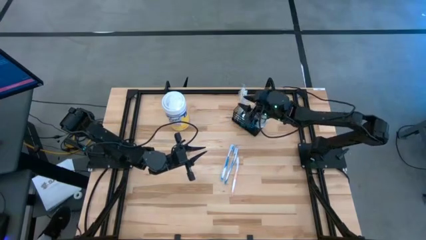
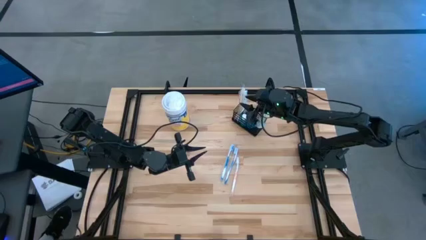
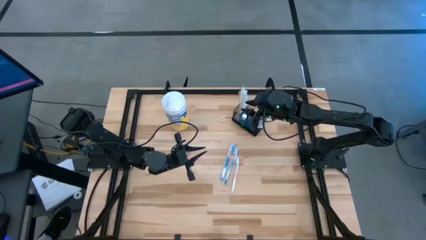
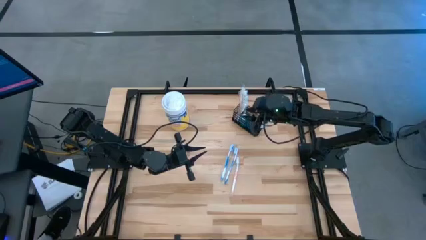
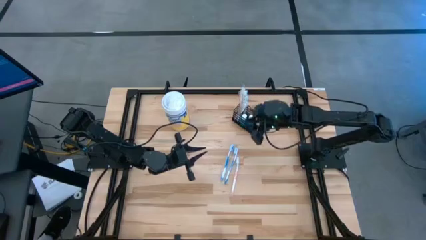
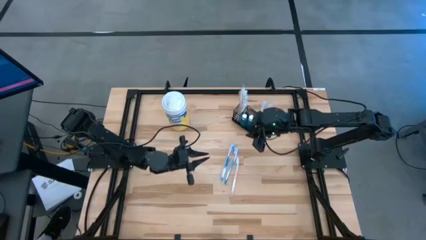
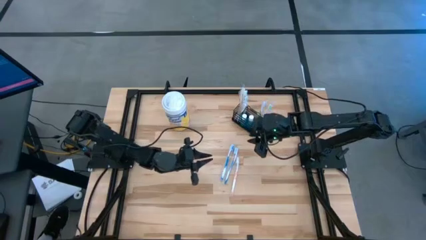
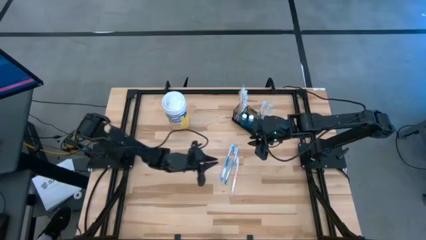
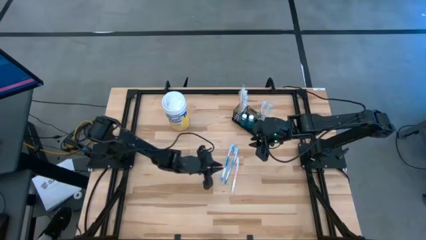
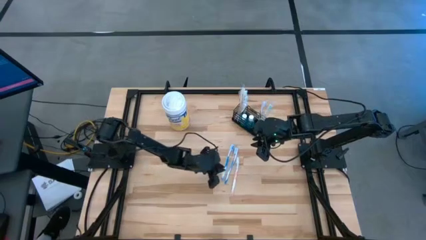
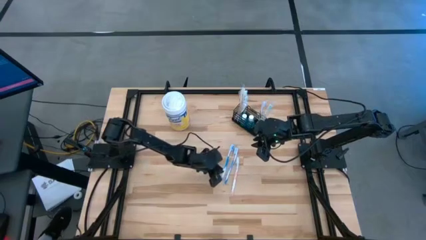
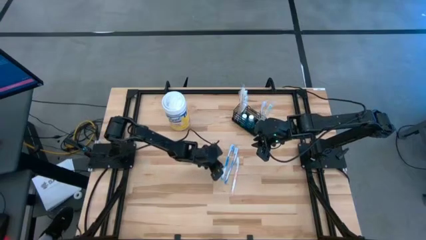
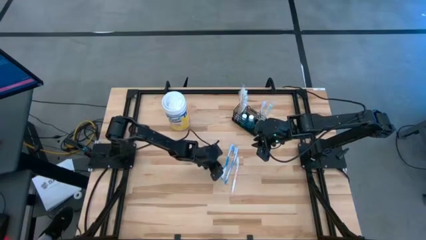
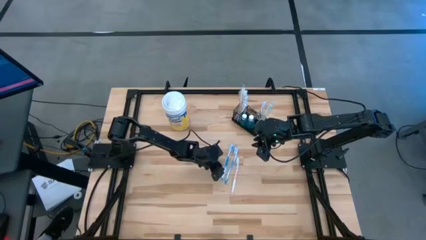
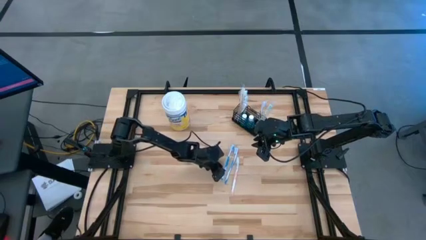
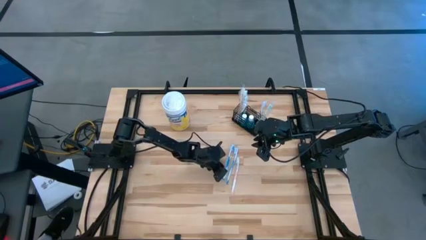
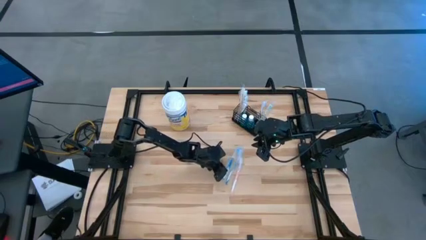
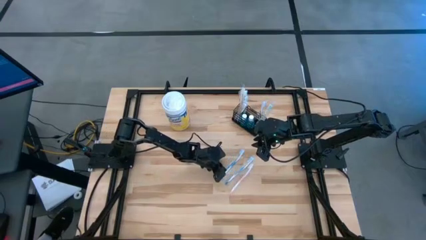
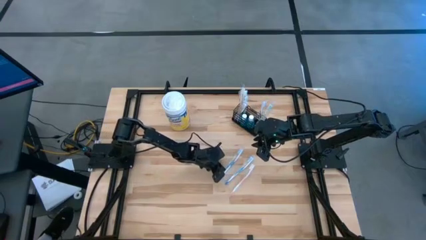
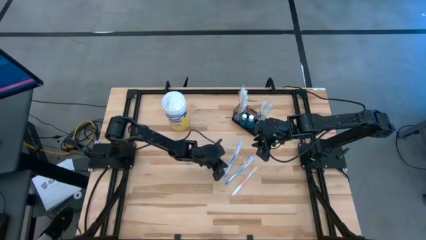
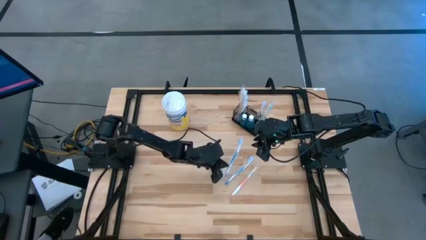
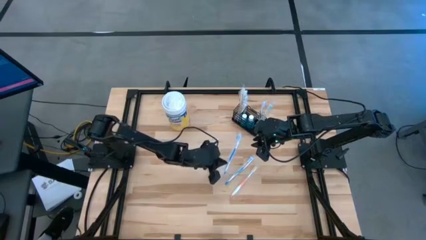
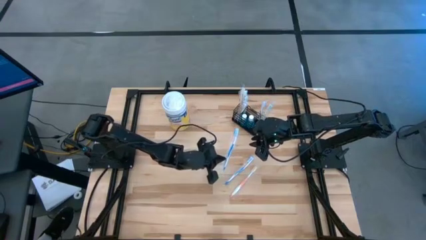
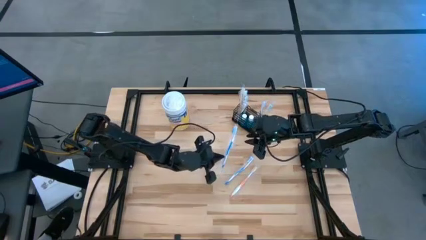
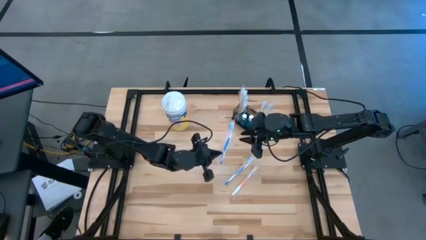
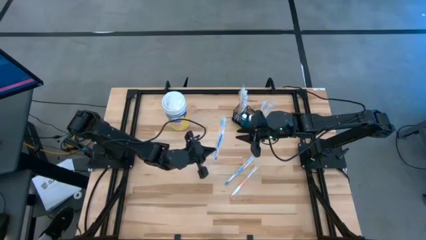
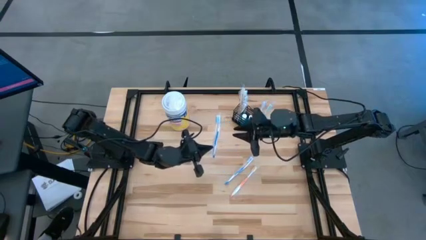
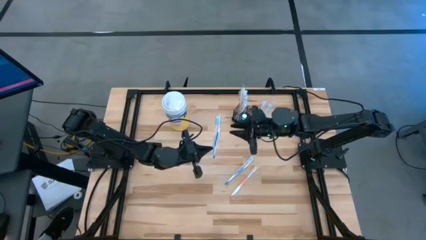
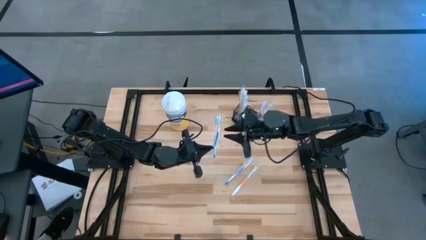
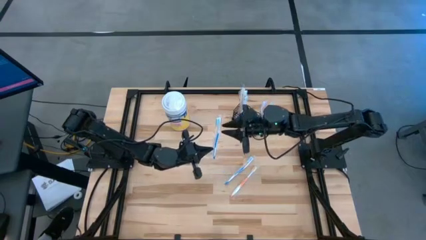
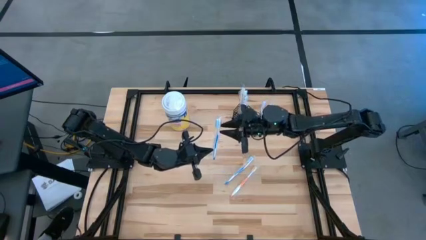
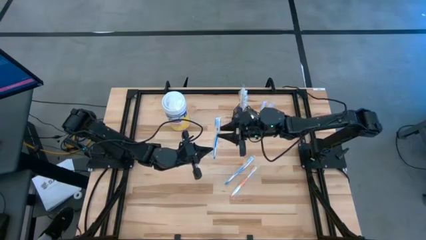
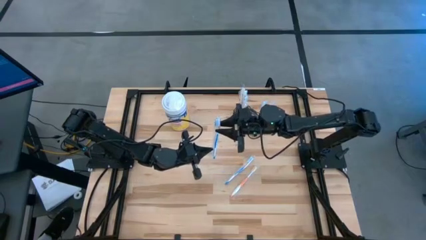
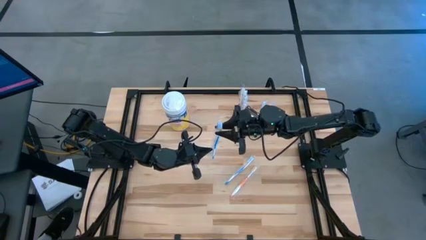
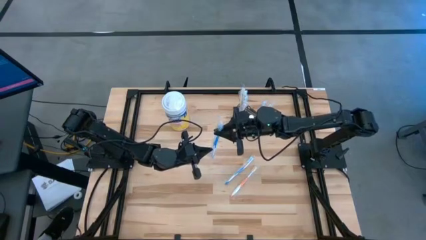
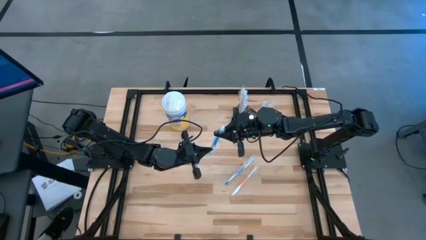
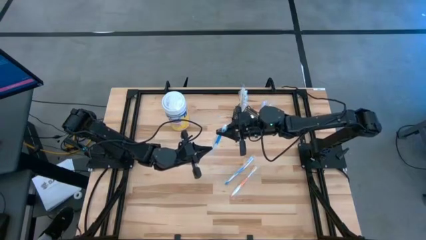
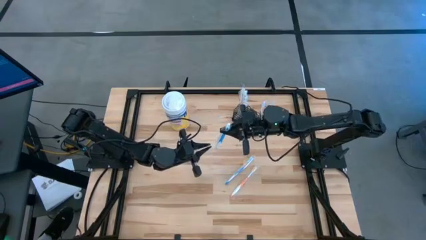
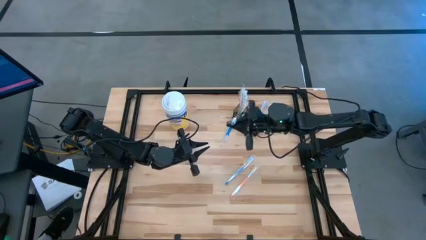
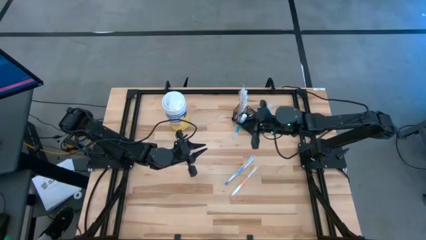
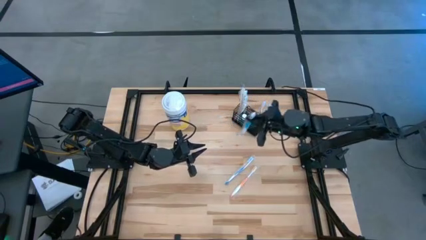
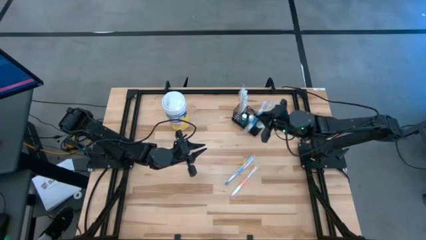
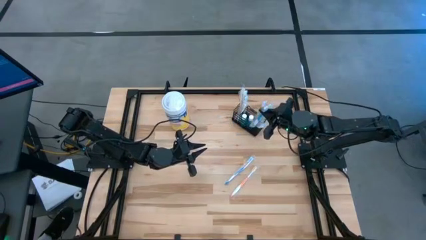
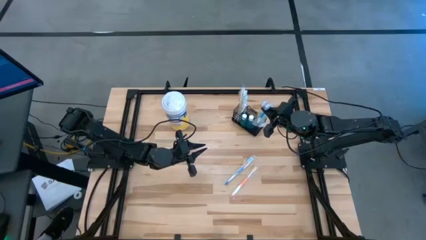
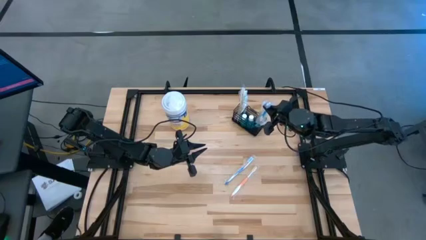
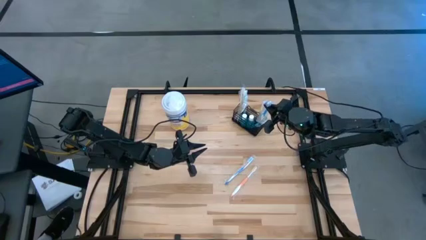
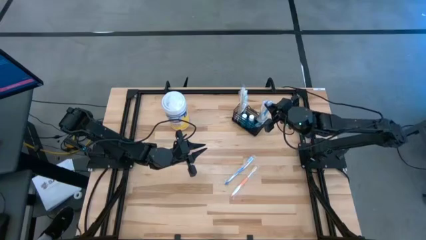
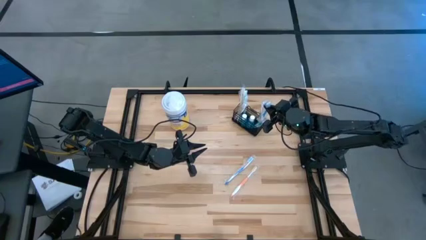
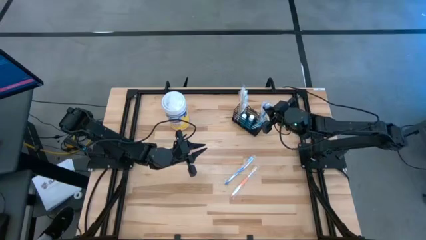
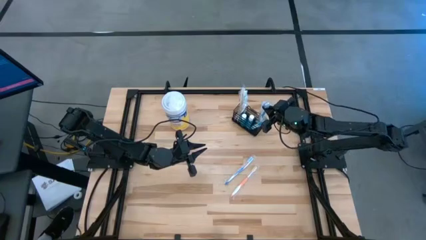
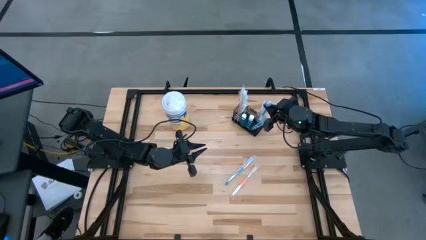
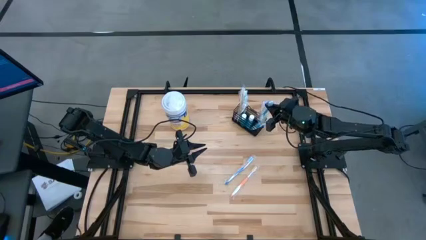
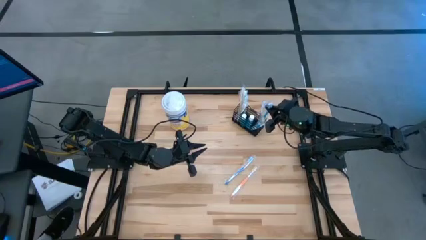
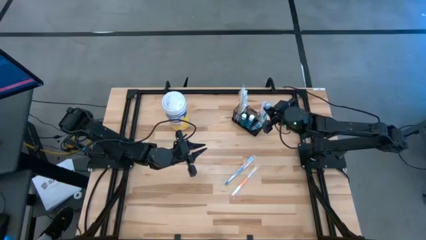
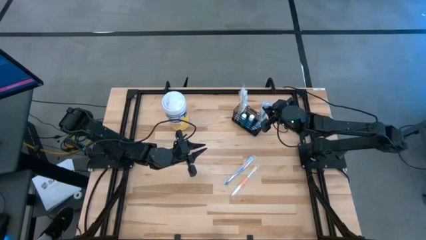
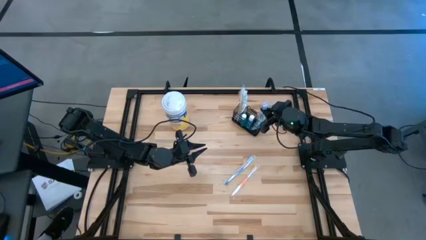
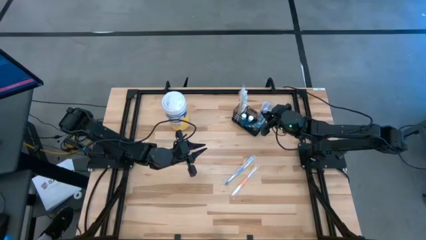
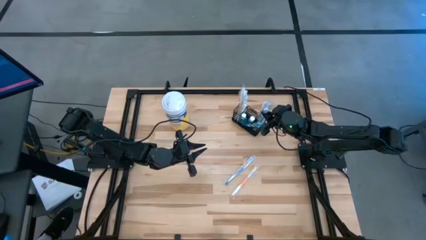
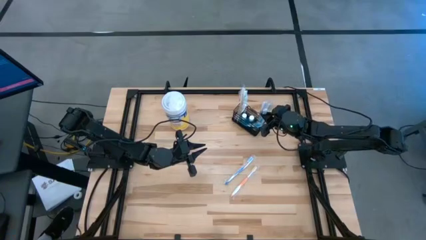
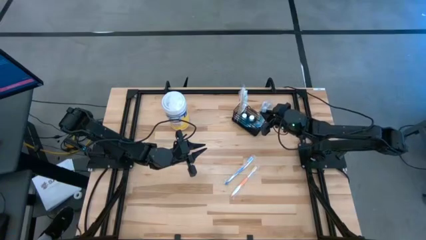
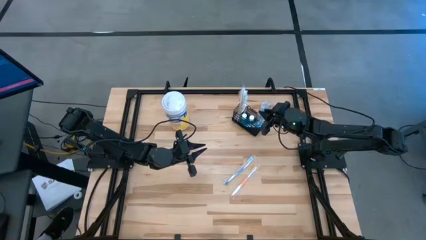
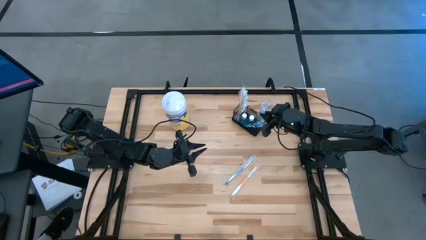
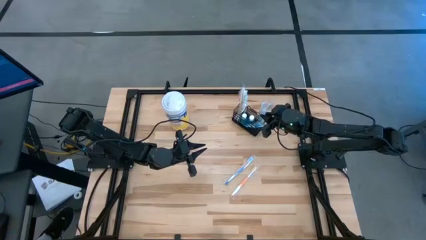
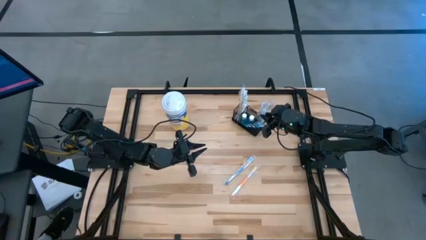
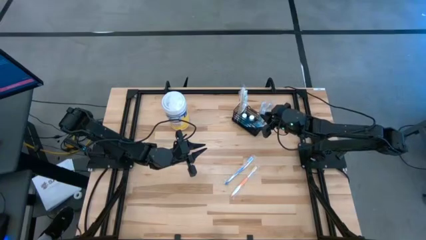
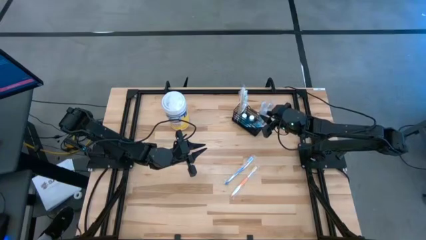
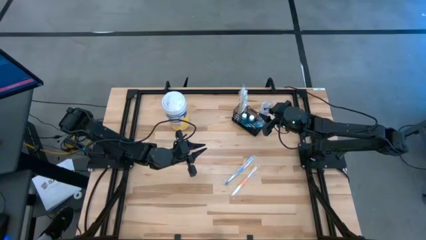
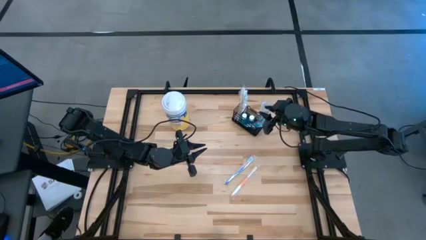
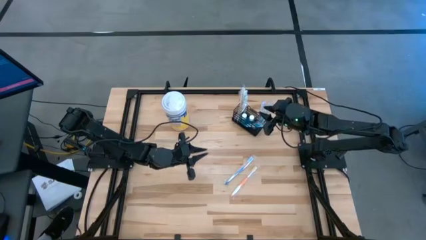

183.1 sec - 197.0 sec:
Task: Pick & Place toothbrushing station
Put the left blue toothbrush into the black wire organizer

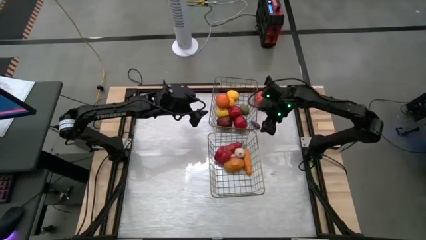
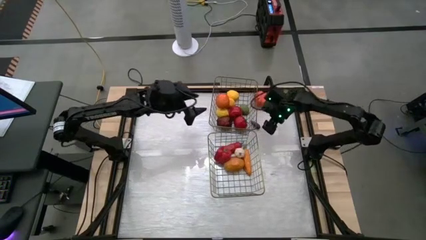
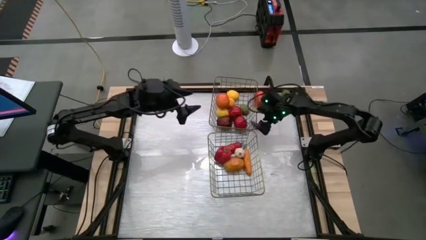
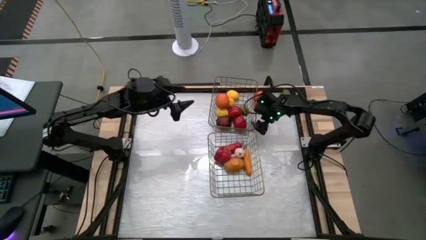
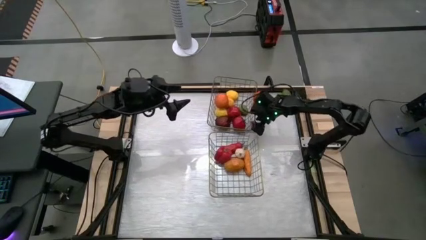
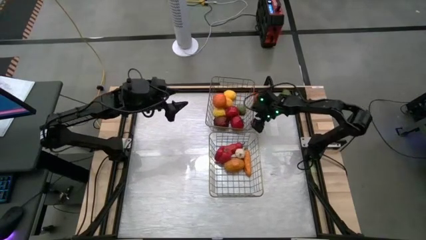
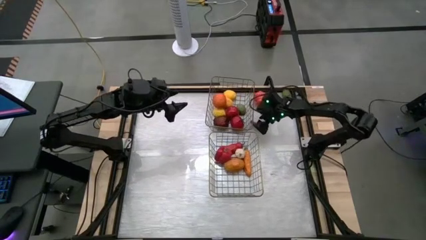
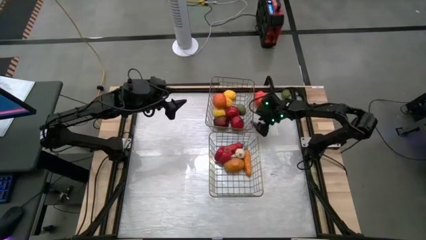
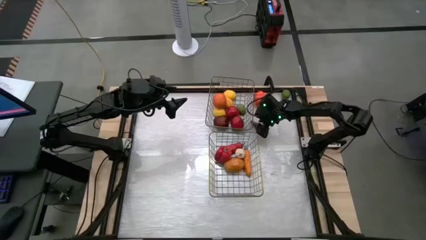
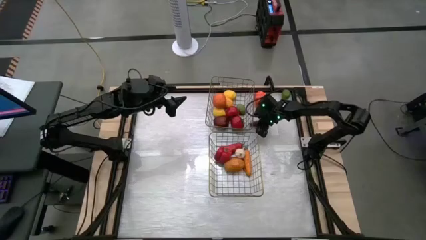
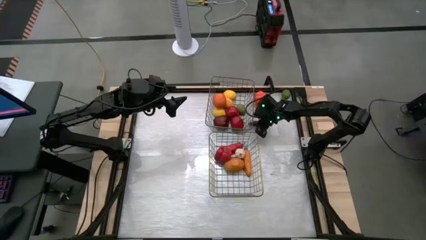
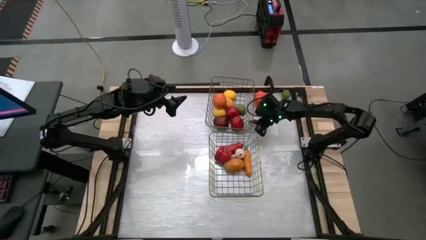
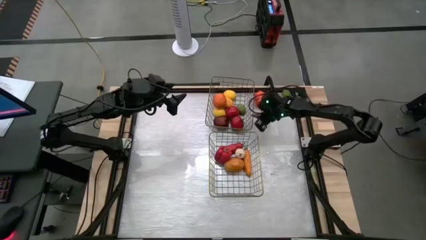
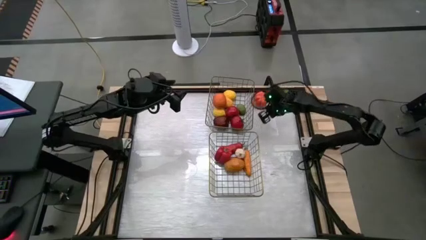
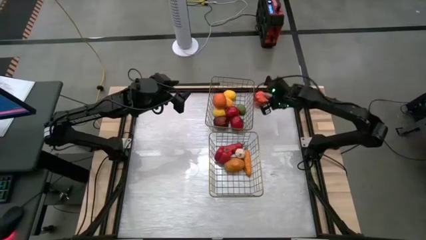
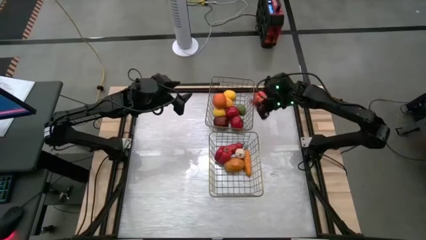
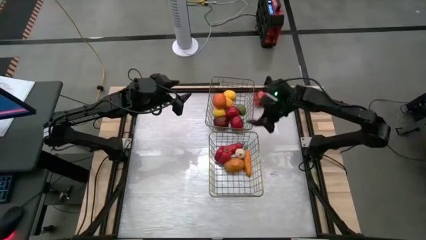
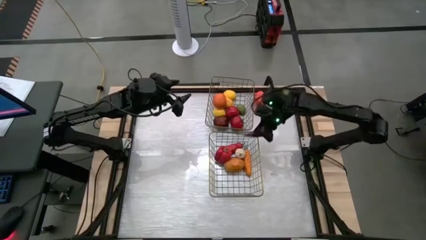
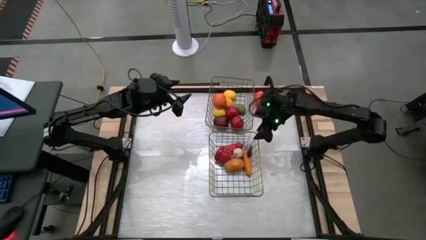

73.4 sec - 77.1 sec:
Task: Sort produce into baskets
Put the purple eggplant into the bottom wire basket
